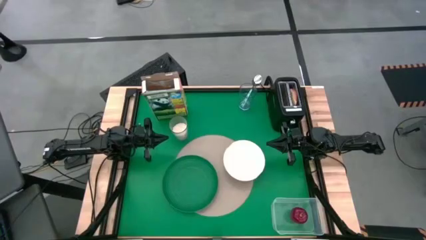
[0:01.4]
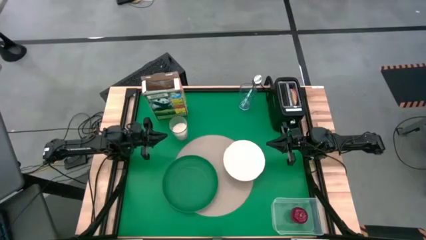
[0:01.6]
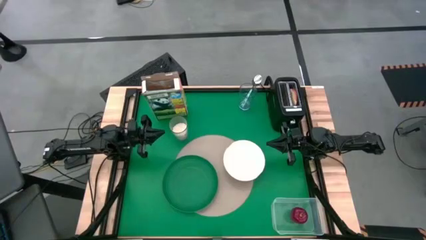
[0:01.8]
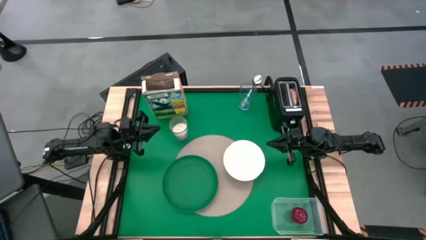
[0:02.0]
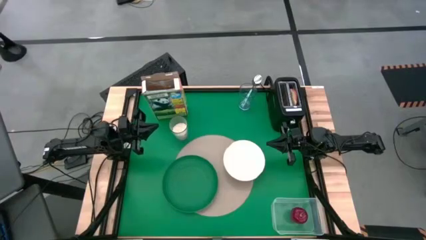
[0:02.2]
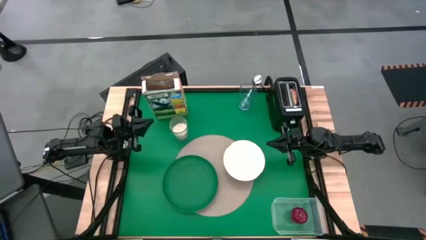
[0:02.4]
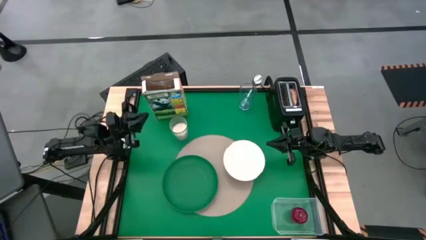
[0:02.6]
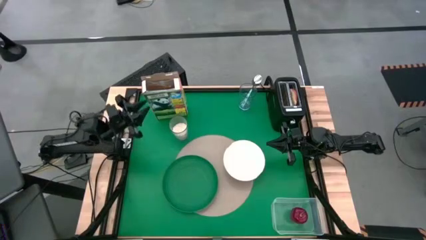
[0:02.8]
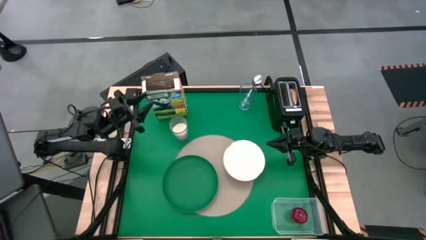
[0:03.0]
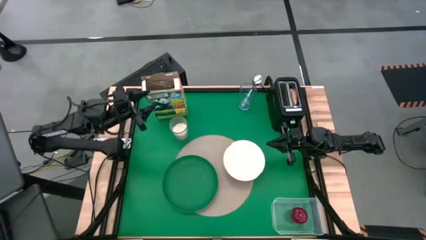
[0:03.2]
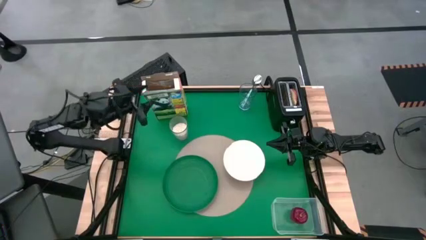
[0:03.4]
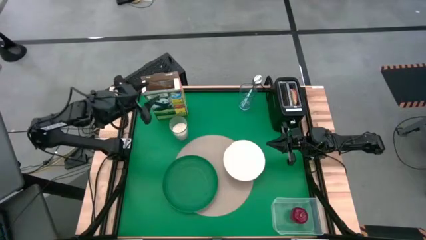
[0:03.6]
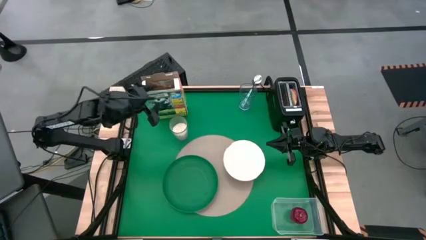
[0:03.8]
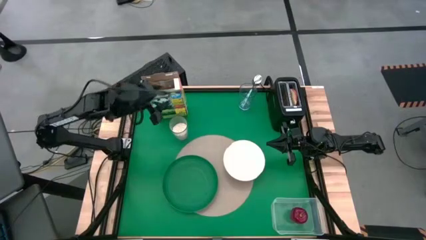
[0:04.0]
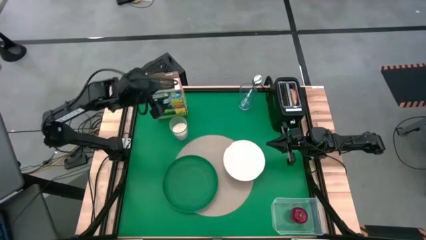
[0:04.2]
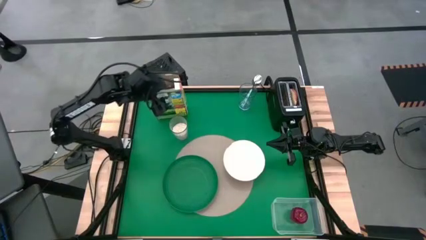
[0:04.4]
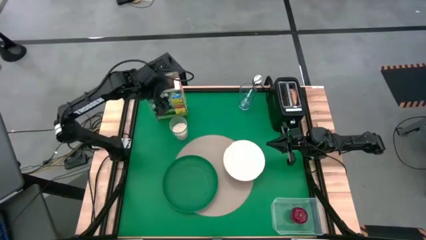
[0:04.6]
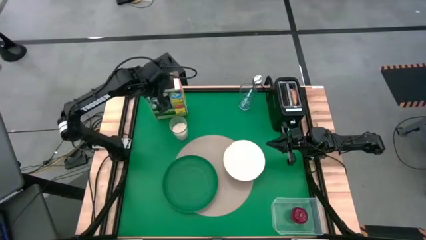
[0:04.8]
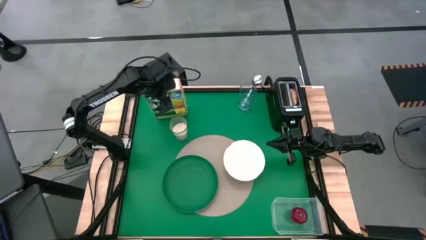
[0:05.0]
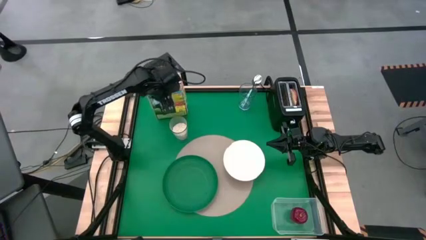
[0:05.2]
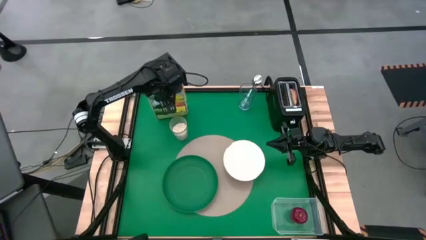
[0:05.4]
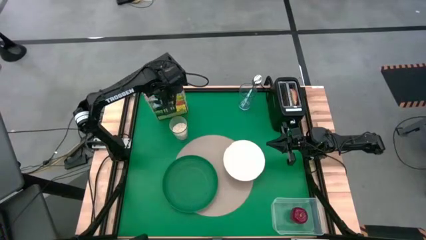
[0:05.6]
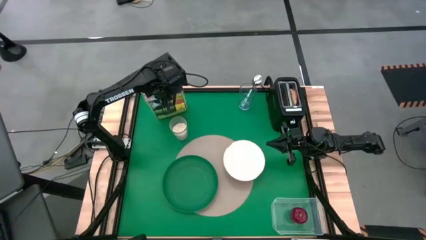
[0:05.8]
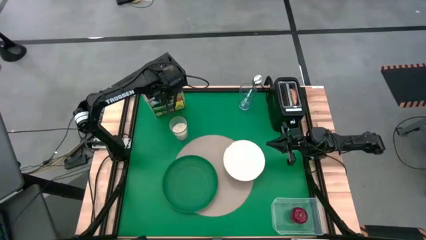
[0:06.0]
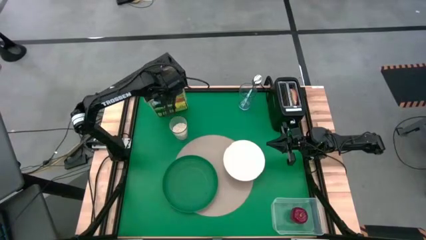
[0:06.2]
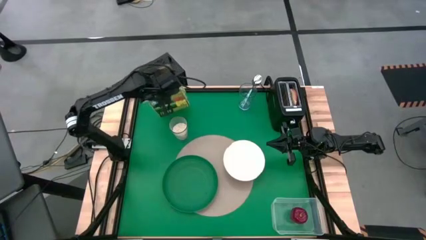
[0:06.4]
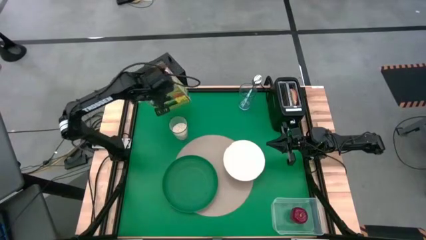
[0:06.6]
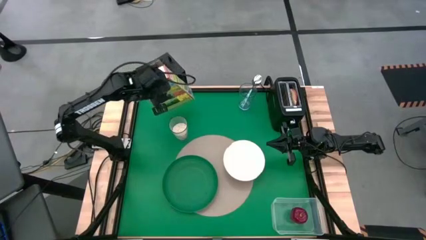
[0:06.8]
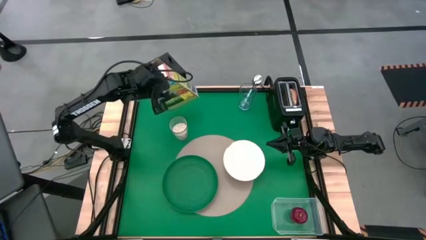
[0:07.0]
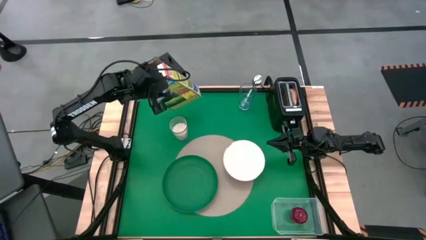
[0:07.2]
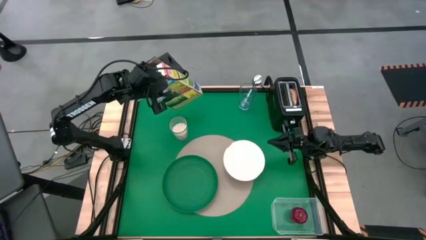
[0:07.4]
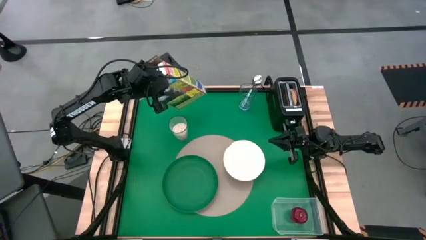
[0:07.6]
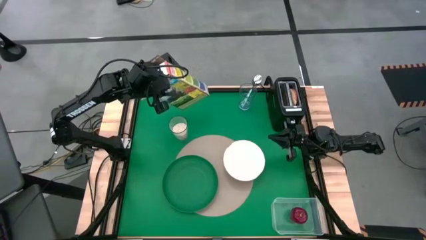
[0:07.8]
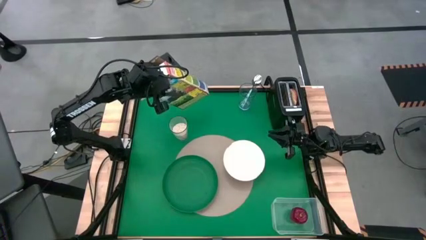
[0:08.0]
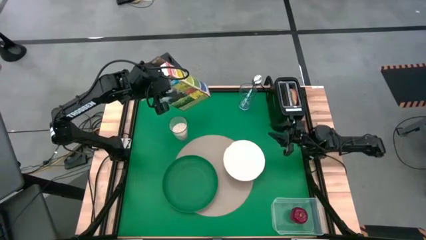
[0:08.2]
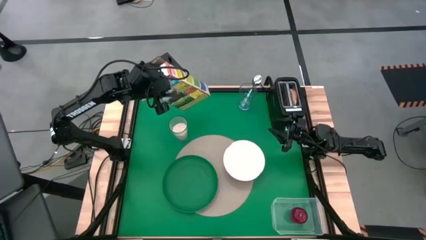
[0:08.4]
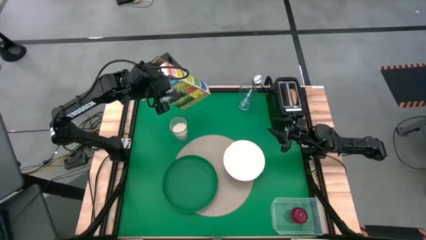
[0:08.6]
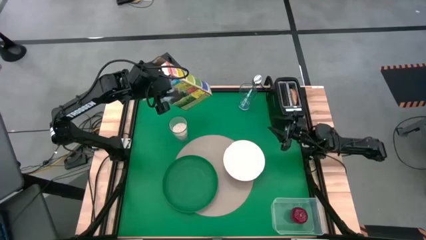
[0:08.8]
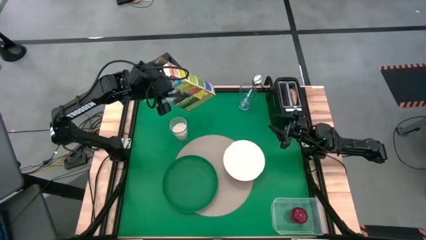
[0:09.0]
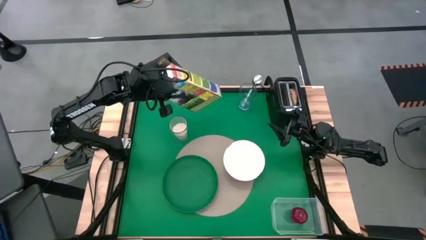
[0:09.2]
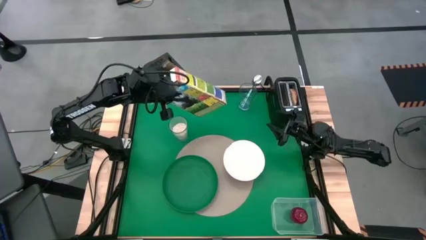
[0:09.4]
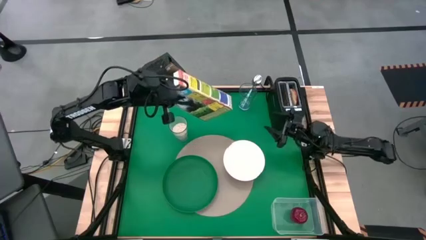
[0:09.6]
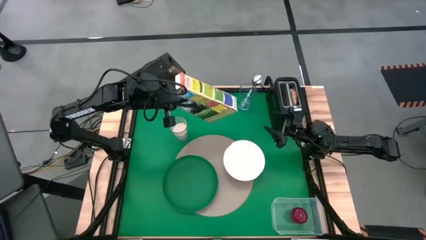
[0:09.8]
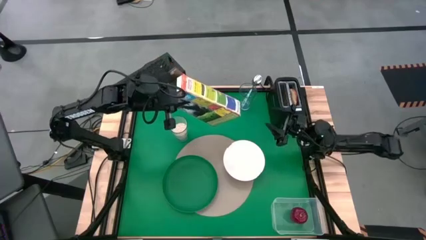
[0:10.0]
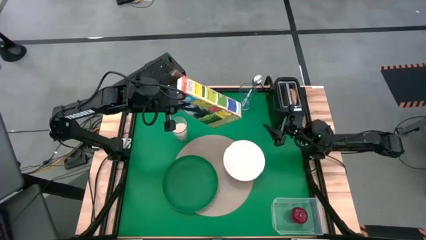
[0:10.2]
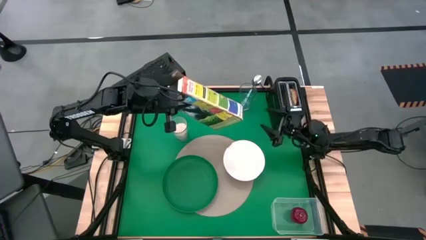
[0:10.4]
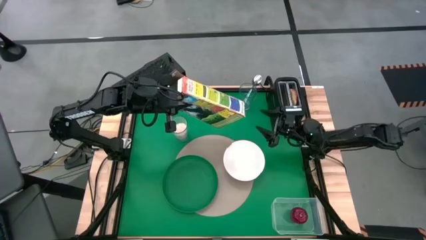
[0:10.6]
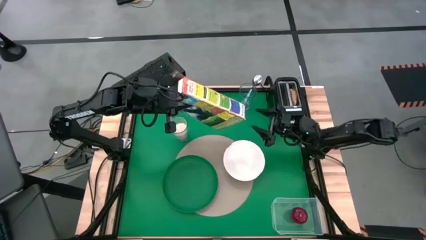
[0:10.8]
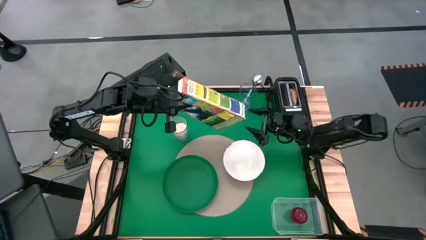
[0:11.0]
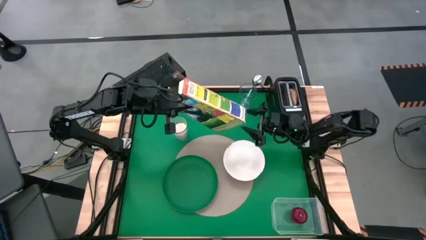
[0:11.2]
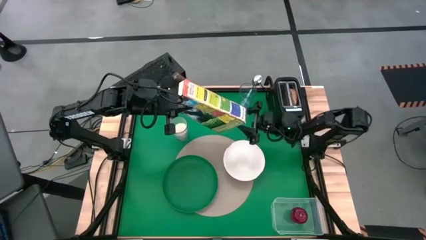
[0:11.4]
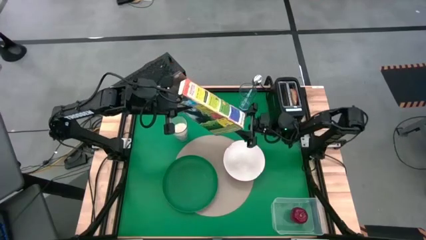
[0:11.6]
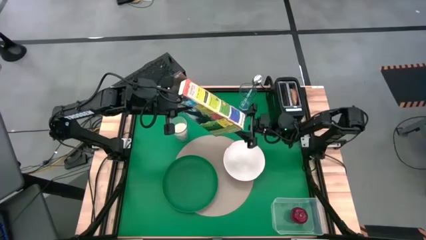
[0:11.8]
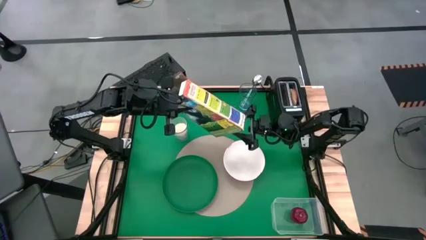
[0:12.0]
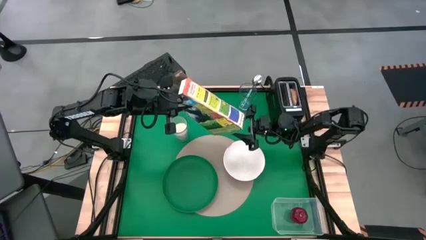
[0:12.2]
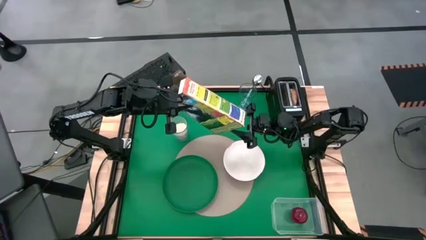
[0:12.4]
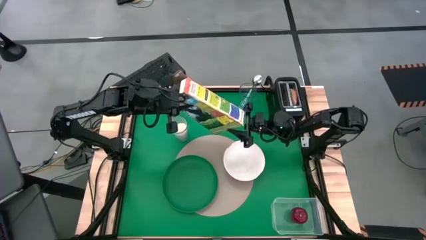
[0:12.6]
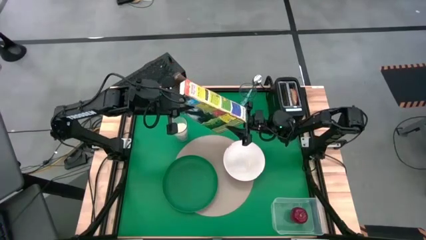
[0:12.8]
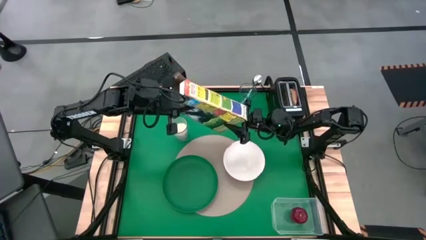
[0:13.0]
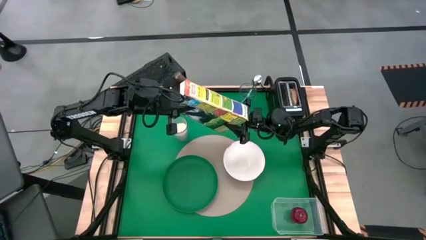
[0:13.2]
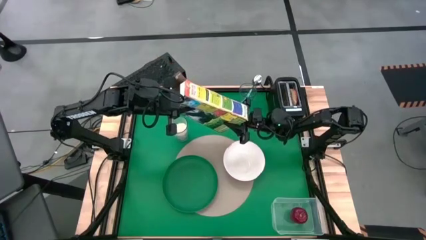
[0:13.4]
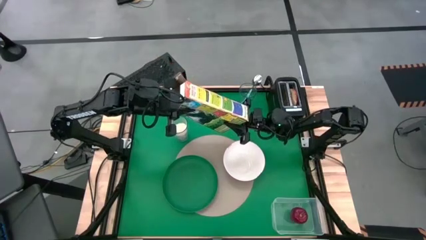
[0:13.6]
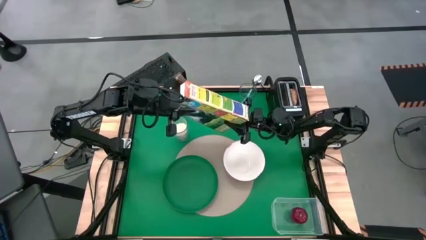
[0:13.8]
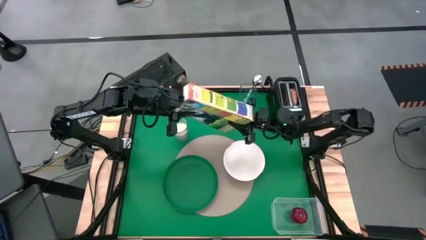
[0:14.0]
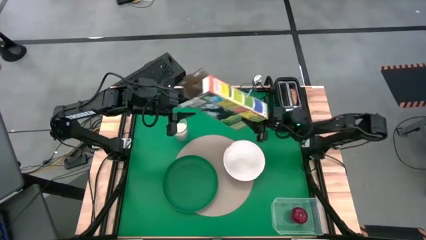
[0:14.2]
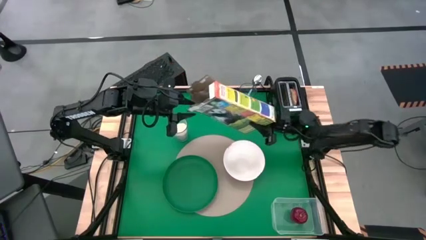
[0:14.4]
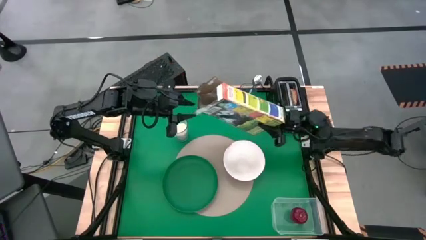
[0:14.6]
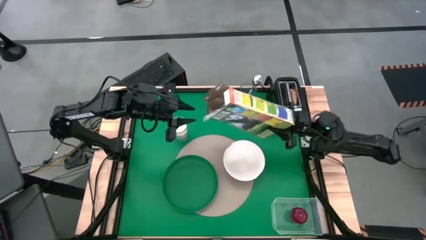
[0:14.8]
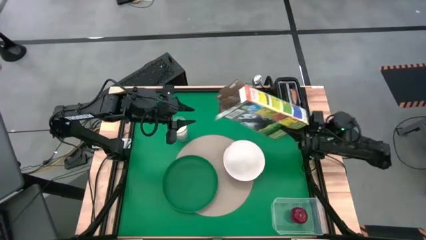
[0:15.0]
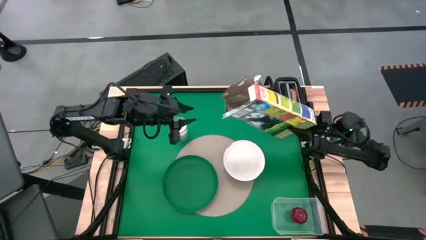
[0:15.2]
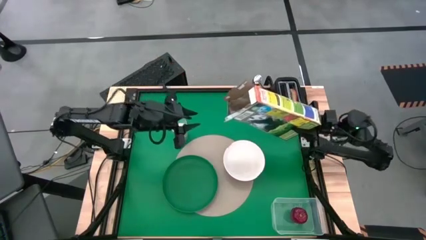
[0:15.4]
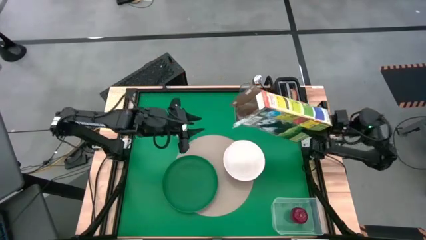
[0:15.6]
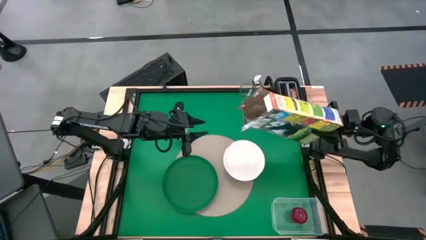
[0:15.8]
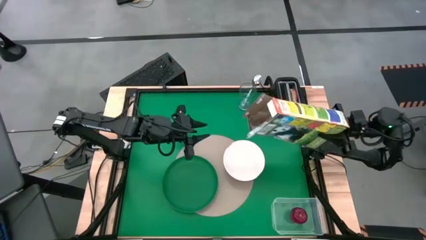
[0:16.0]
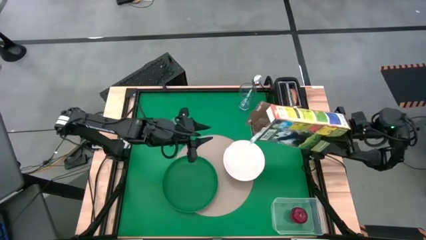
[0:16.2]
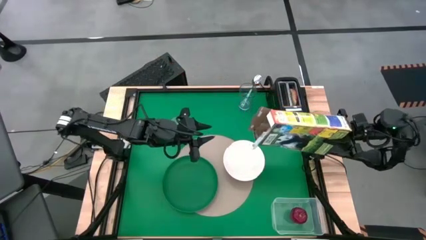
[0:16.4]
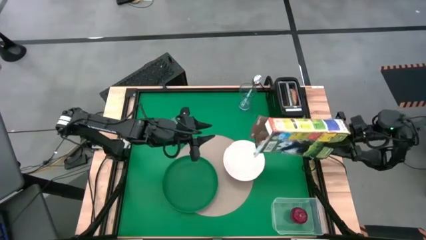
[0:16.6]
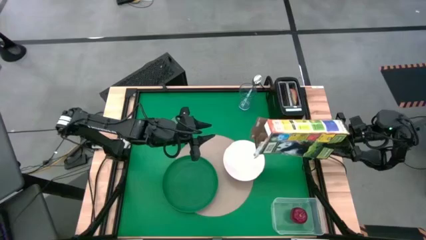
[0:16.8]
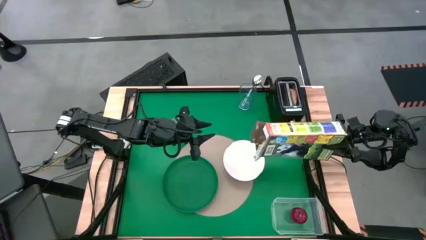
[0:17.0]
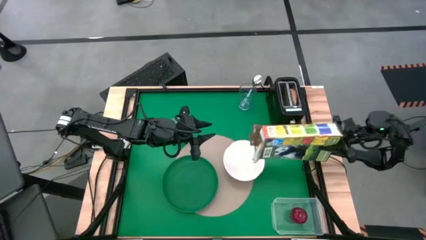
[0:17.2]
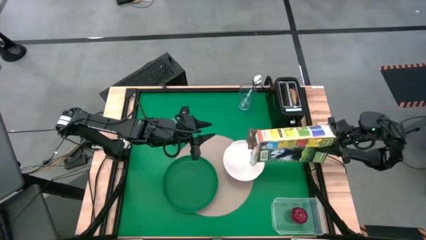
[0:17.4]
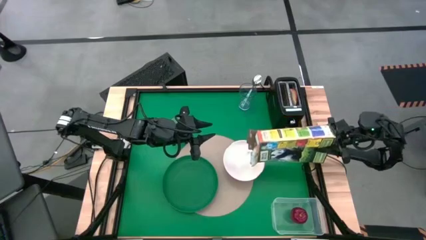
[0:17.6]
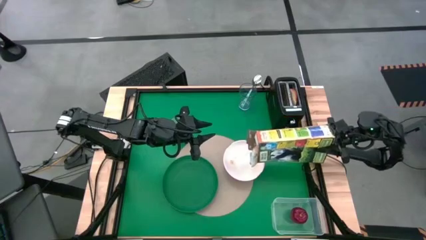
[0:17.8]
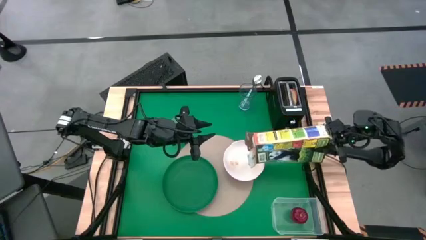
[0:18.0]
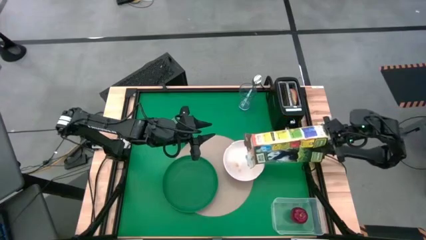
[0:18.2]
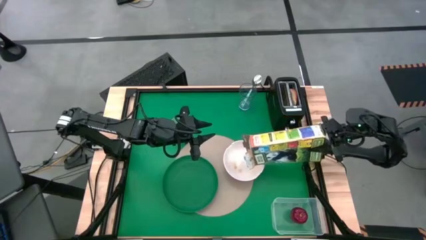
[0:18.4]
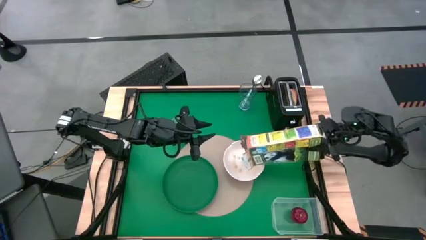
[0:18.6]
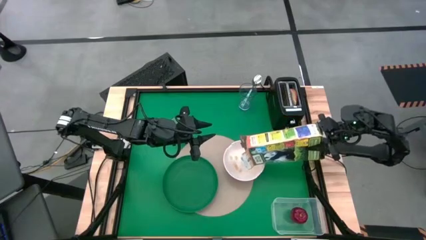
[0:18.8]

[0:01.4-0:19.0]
Task: Arrange a breakfast setting
Pour the cereal from the green cereal box into the white bowl
